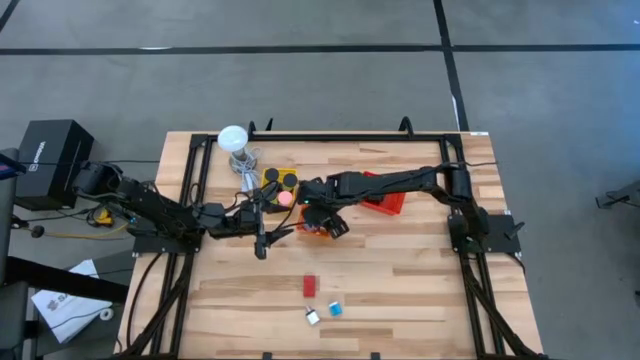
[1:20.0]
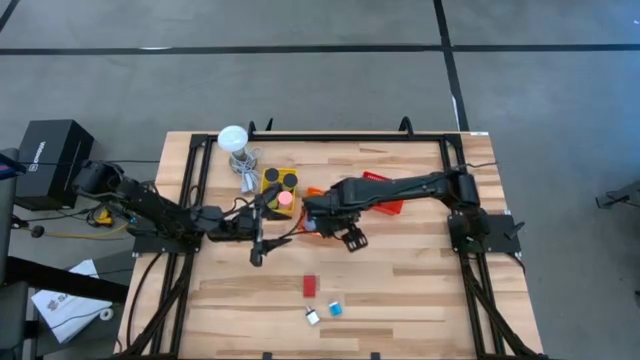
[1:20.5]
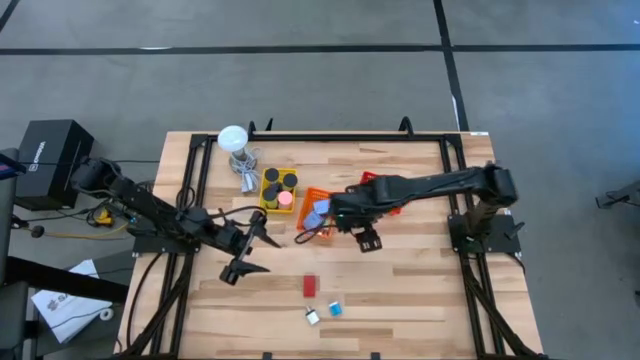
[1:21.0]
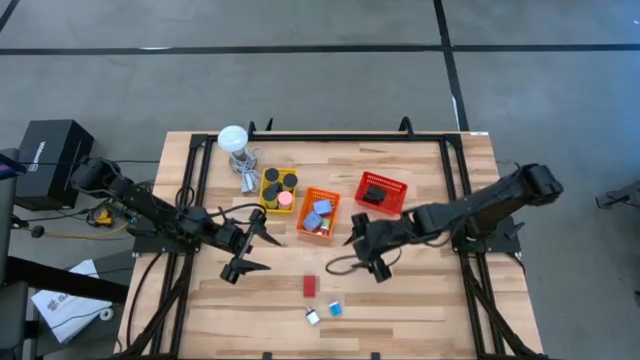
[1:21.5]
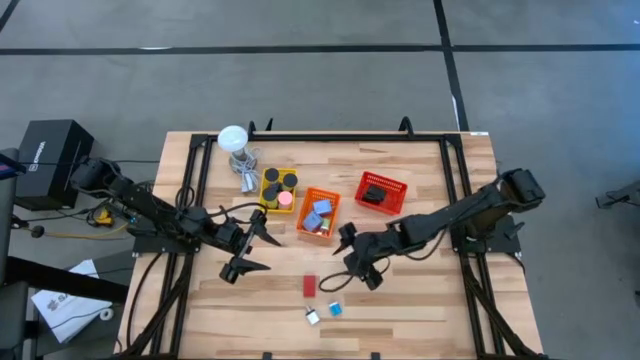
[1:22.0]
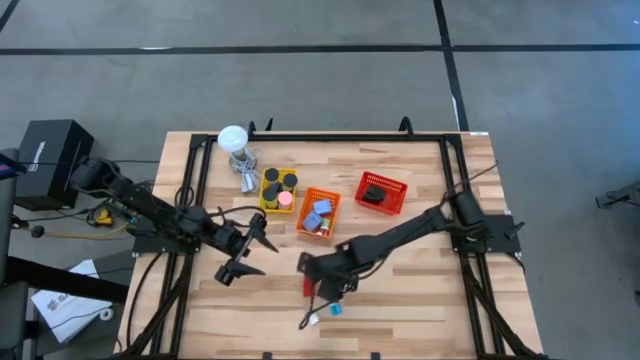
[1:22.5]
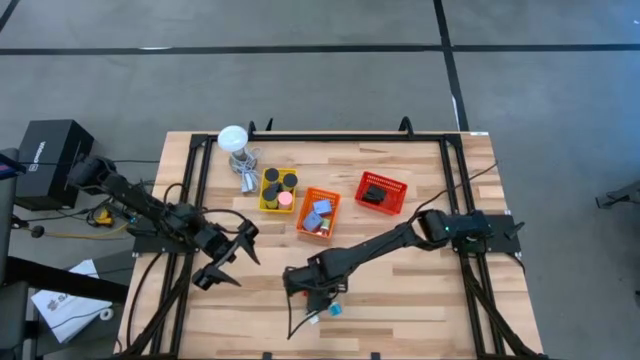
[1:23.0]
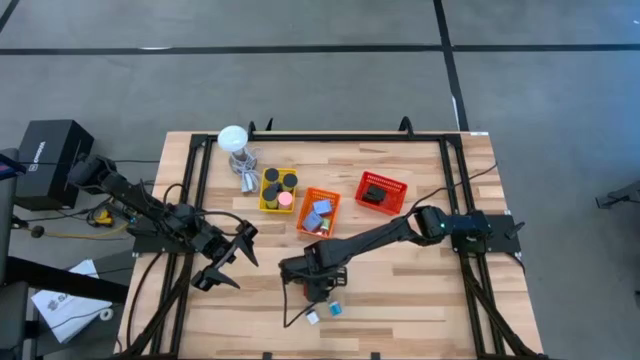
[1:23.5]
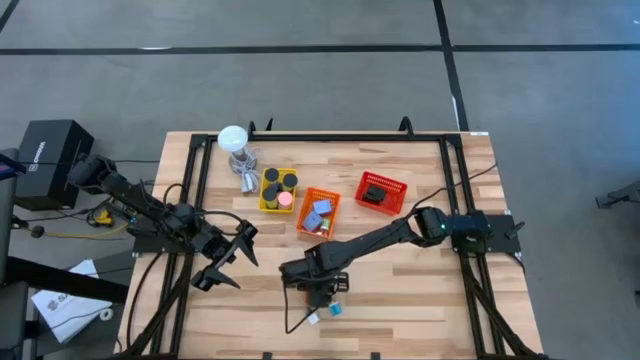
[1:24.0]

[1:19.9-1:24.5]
Task: Pick & Place Office items
Put the red digital clock into the red bin

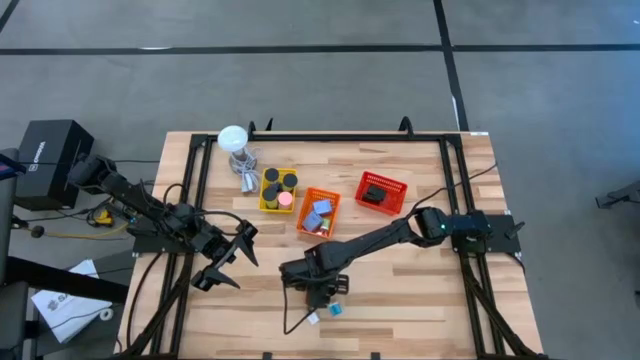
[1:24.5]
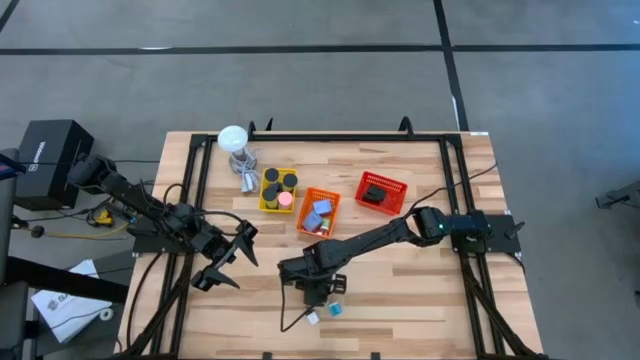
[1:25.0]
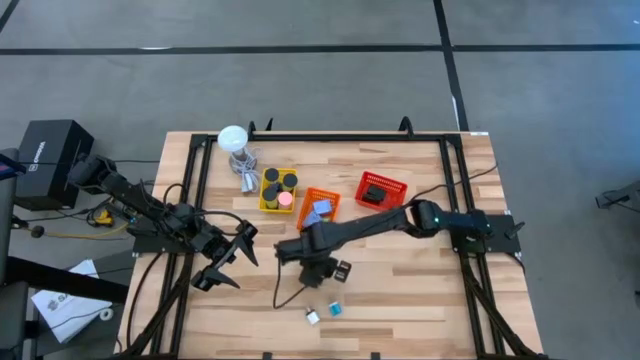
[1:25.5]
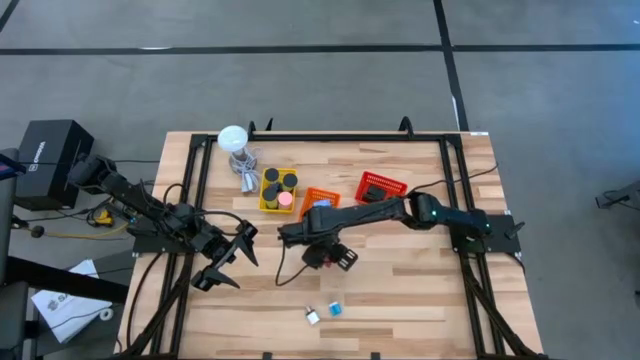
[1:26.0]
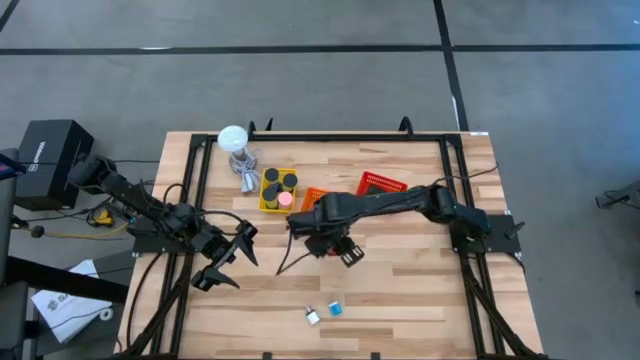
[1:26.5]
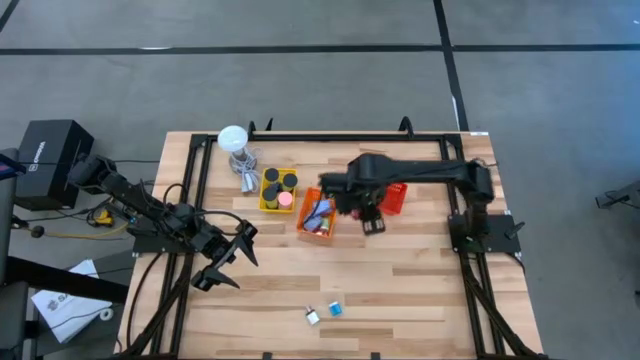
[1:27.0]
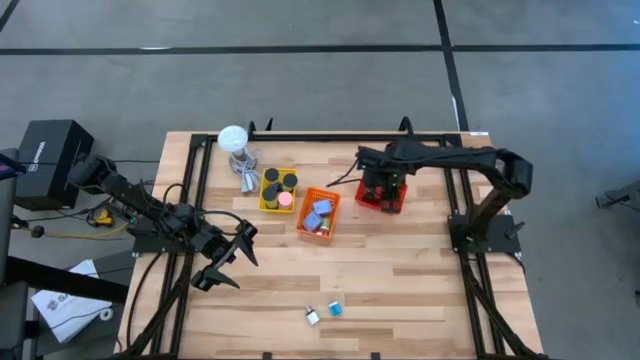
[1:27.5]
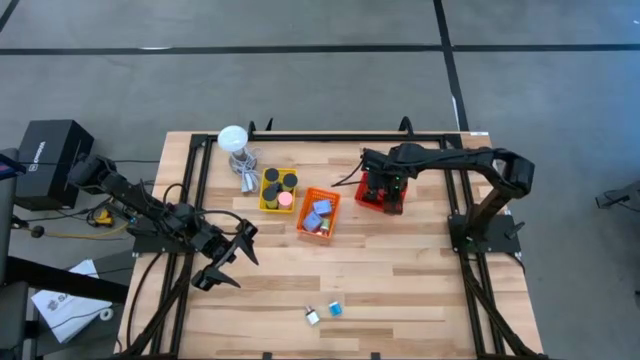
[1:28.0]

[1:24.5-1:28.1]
Put the red digital clock into the red bin

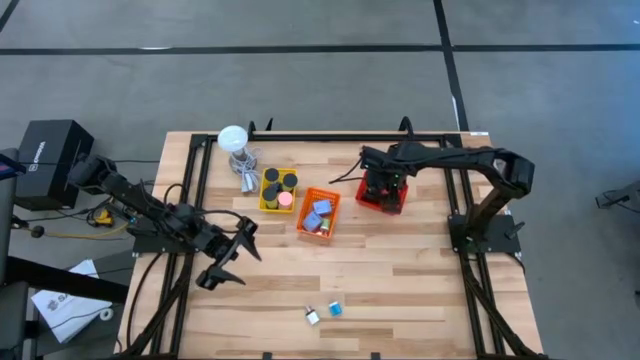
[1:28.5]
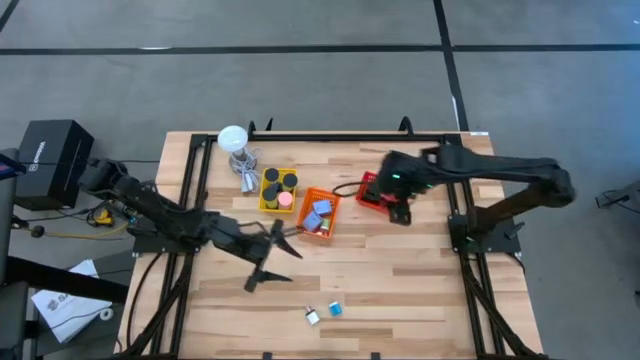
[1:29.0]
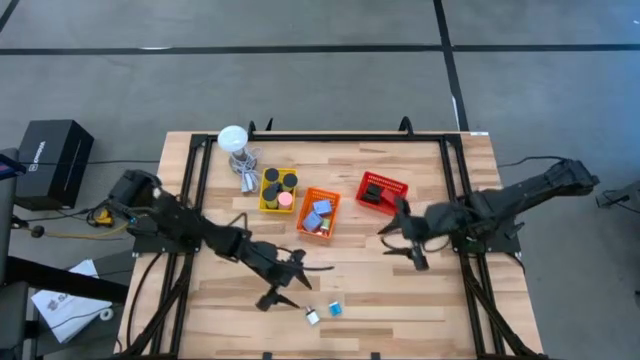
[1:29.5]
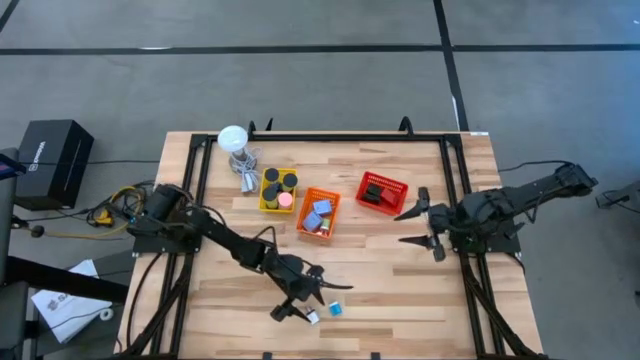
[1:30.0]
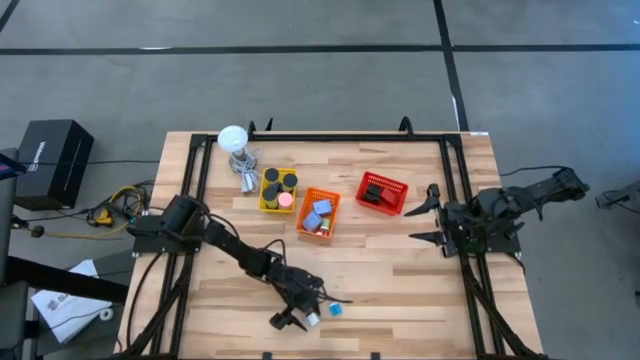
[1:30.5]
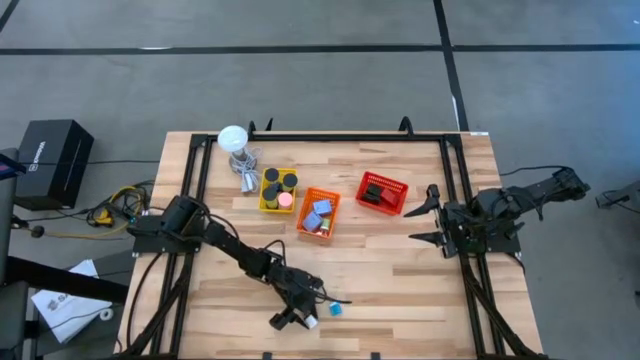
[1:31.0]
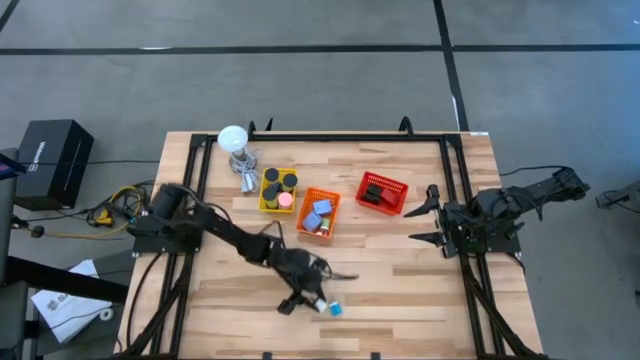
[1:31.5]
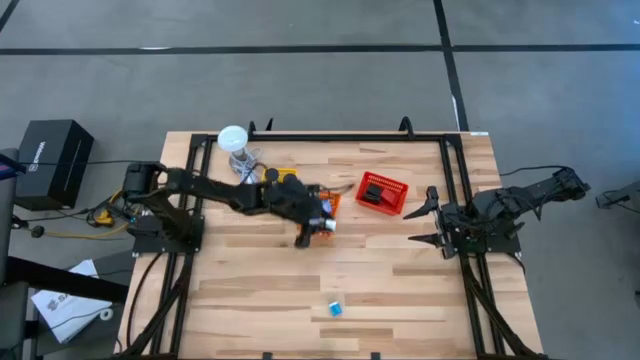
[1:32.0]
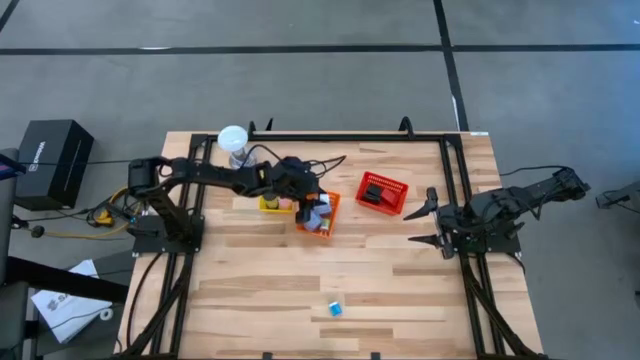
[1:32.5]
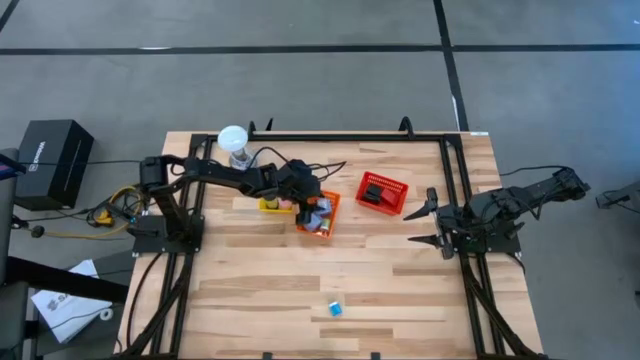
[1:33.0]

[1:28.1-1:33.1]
Put the white charger adapter into the orange bin

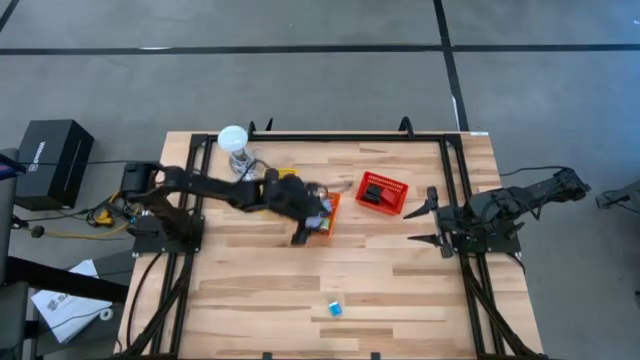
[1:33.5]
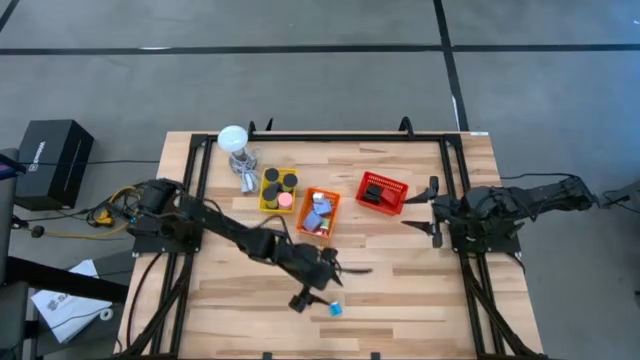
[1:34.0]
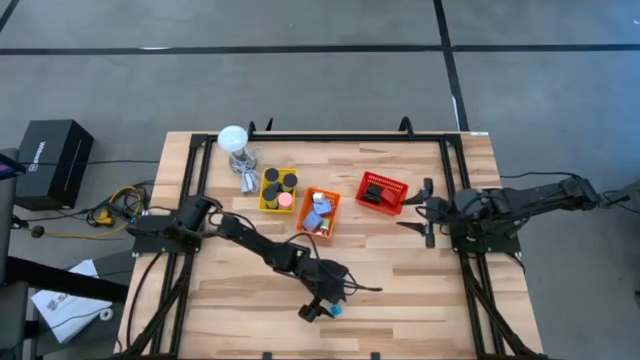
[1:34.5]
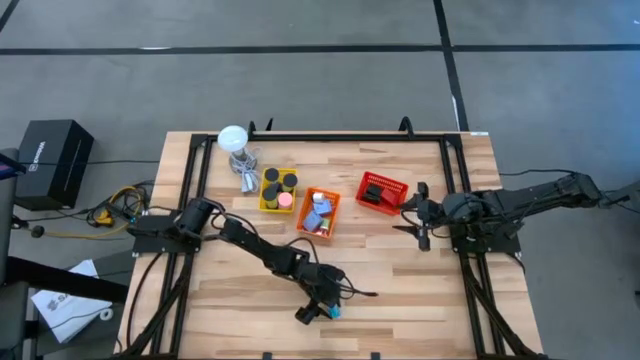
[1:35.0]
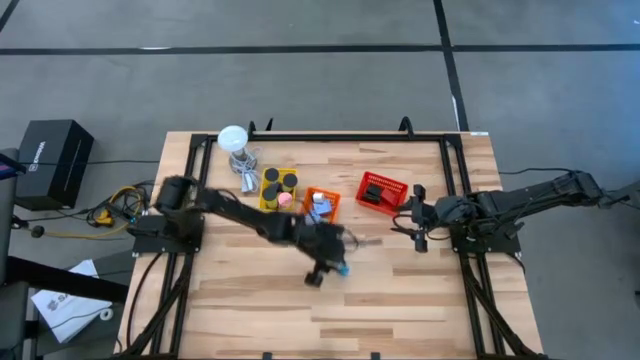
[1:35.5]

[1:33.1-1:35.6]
Put the blue charger adapter into the orange bin

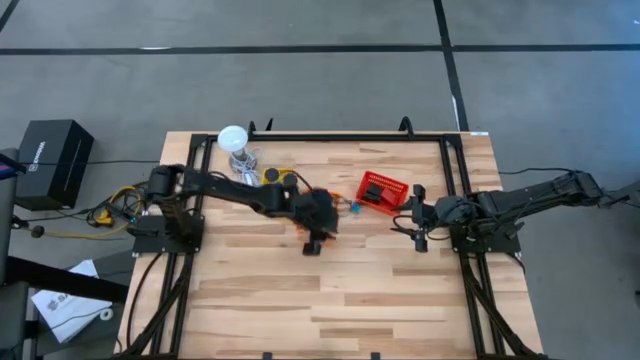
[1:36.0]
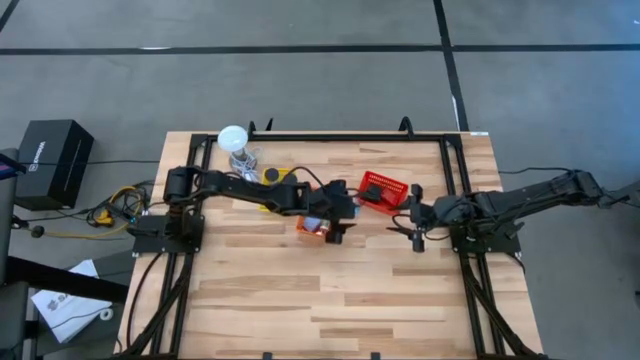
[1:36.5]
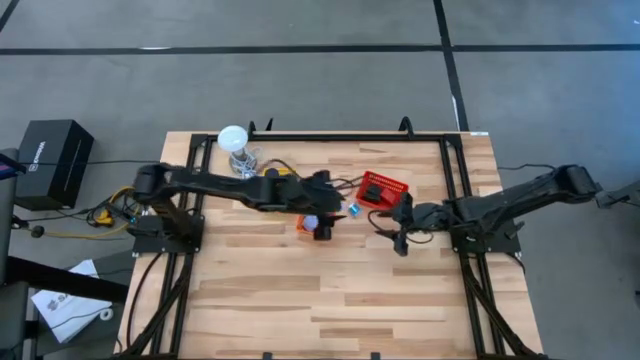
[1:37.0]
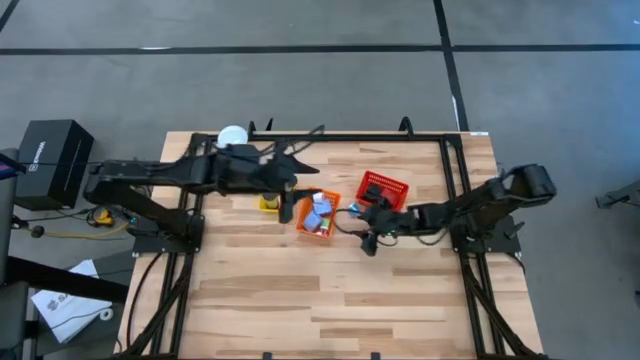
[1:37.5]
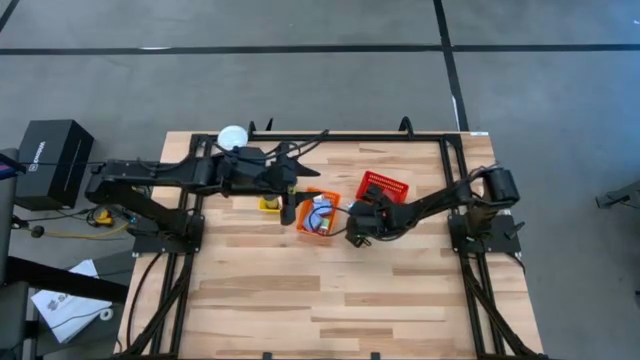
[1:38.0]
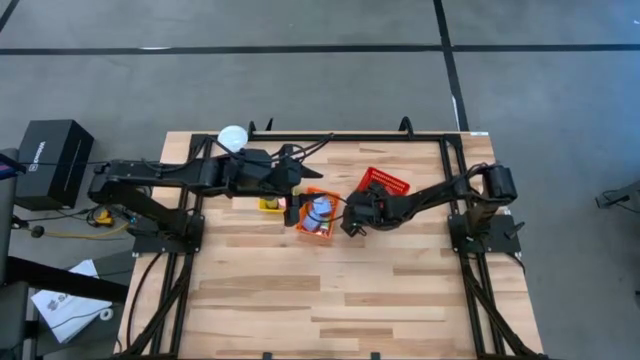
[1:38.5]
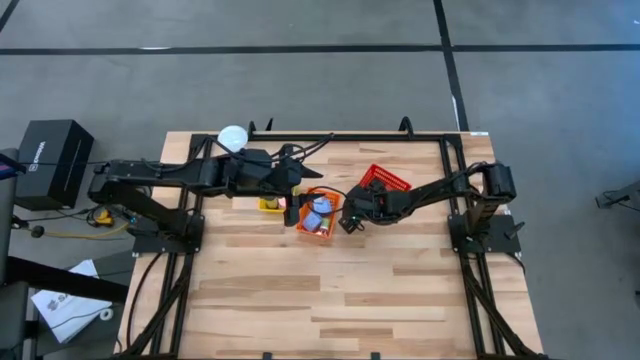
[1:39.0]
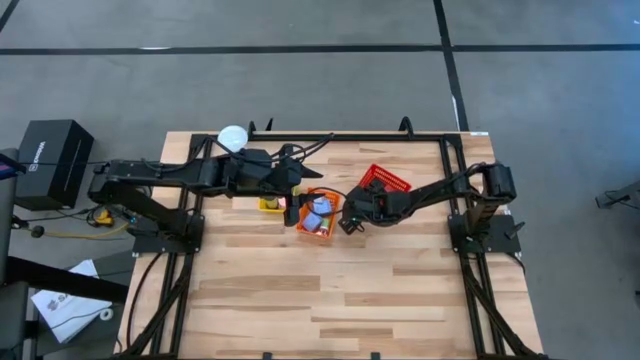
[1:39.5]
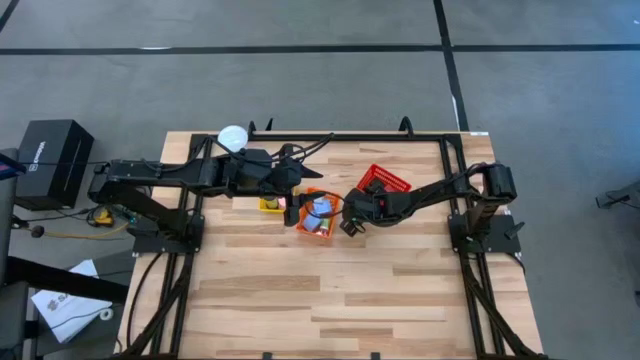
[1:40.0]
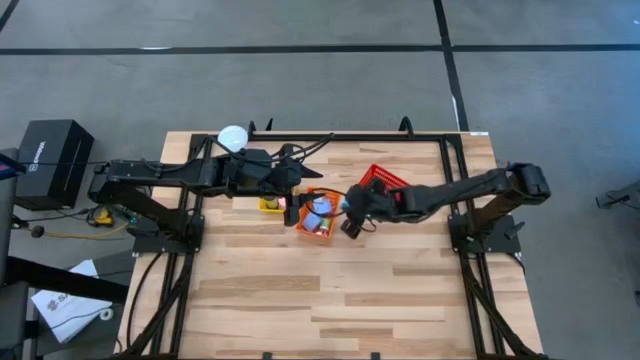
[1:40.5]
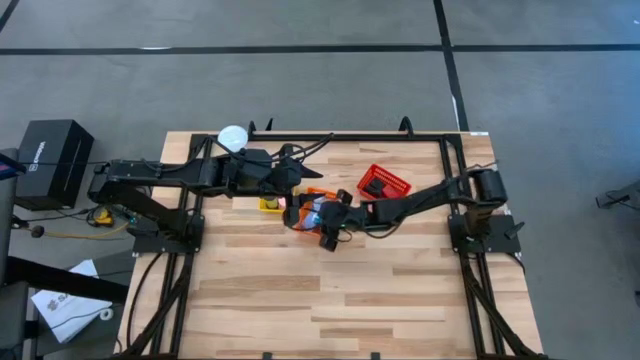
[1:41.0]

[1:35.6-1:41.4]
Put the blue charger adapter into the orange bin
